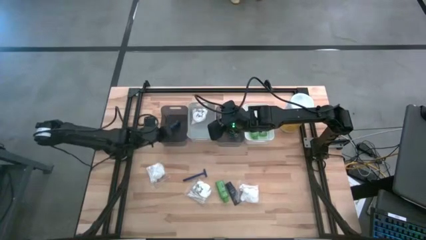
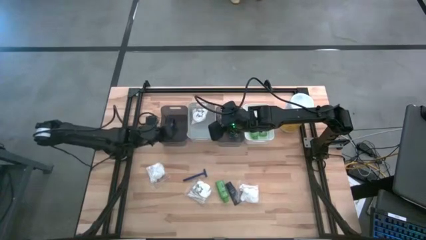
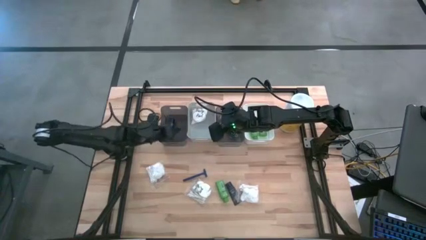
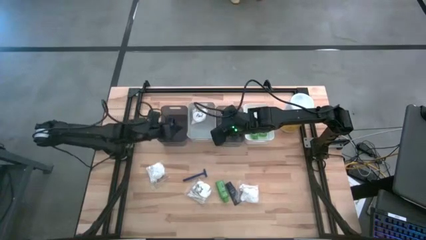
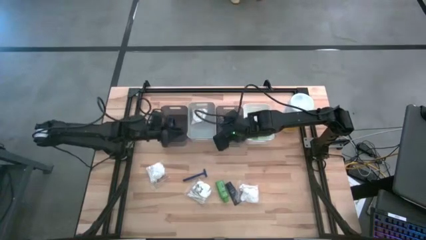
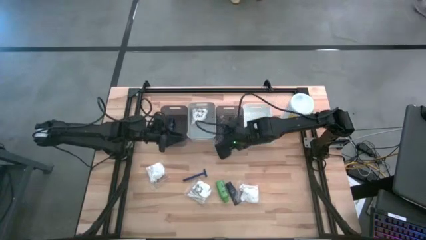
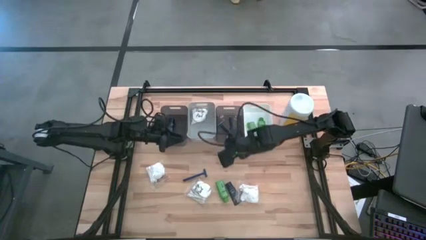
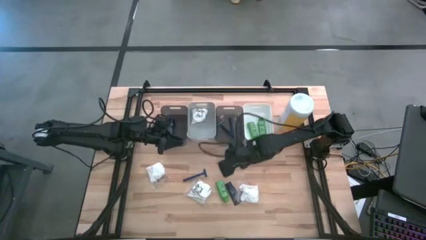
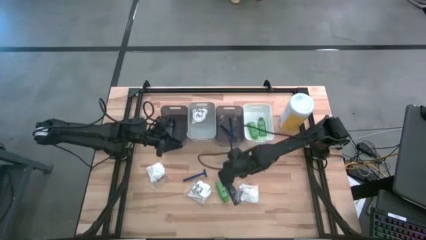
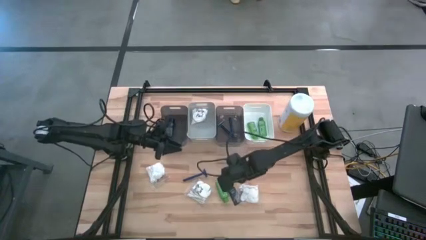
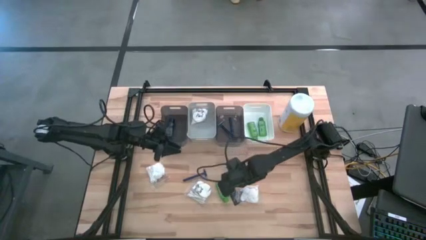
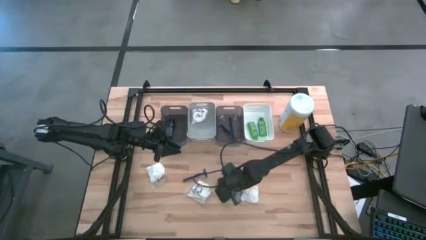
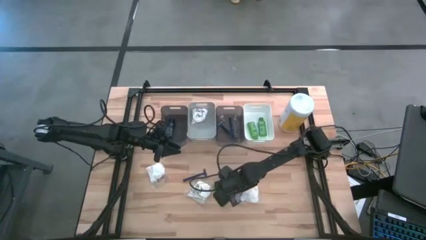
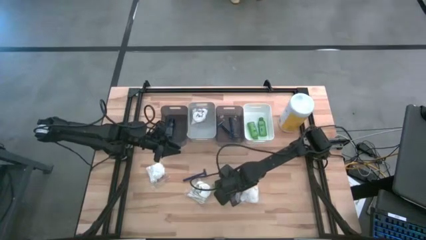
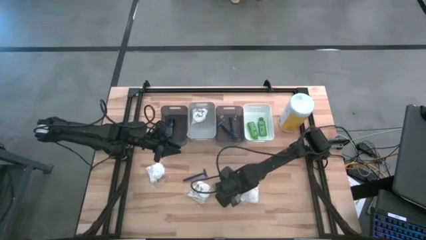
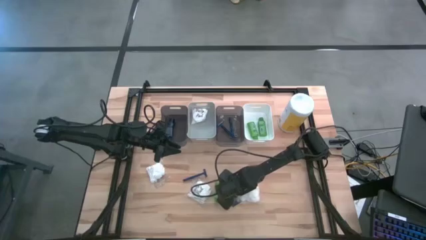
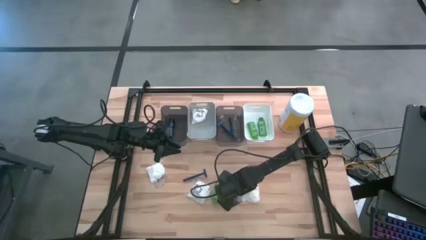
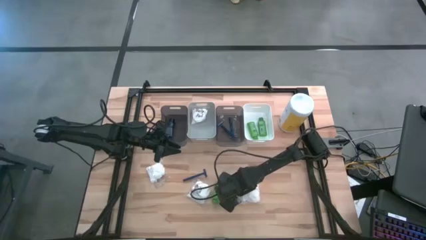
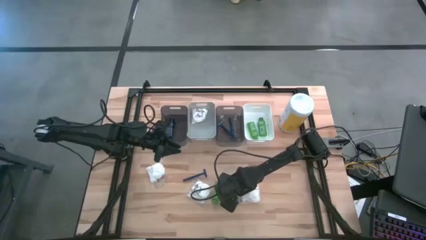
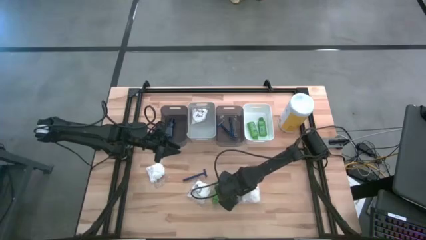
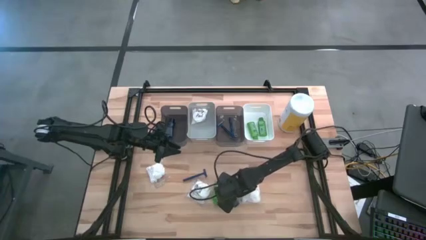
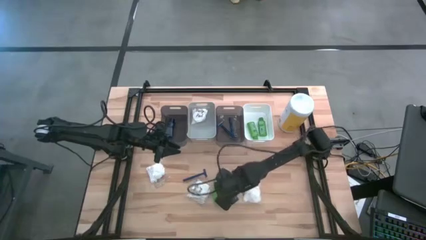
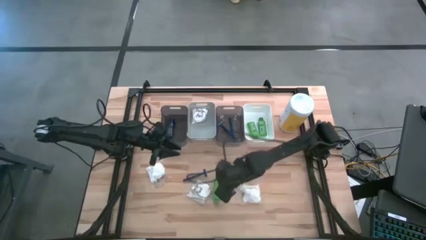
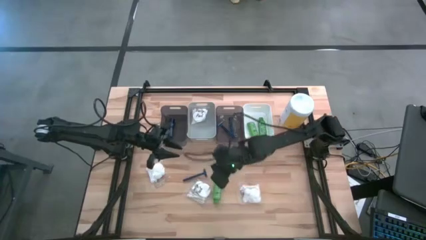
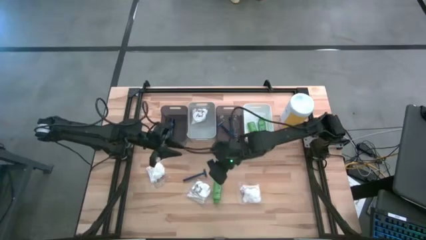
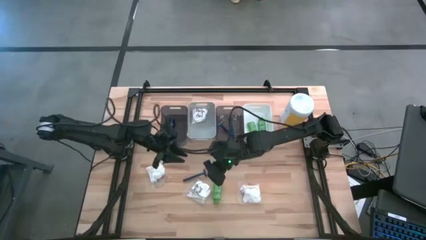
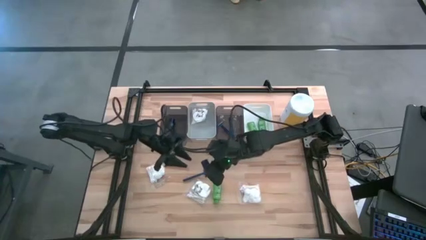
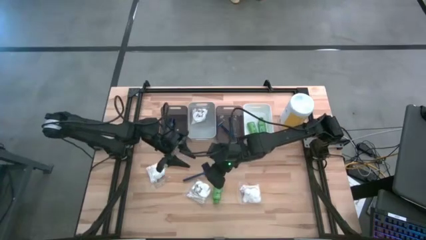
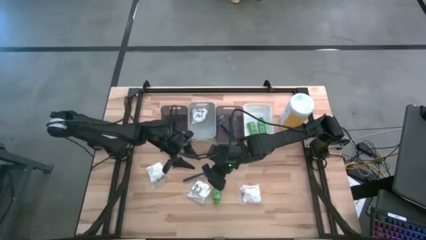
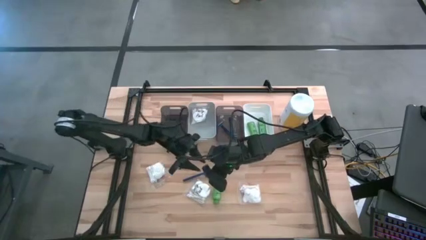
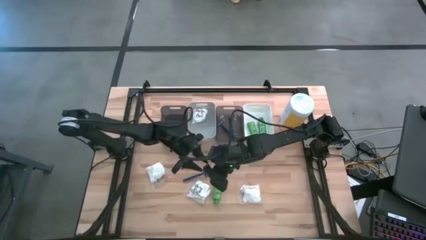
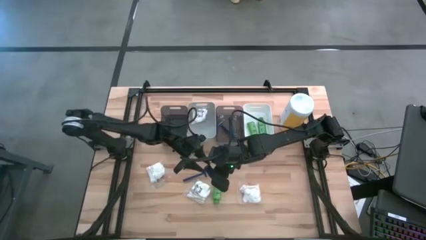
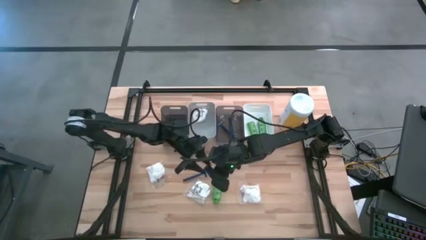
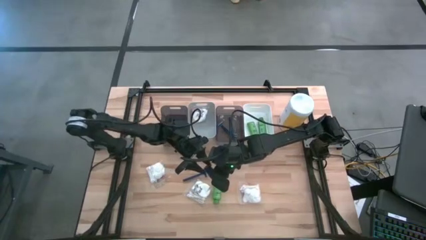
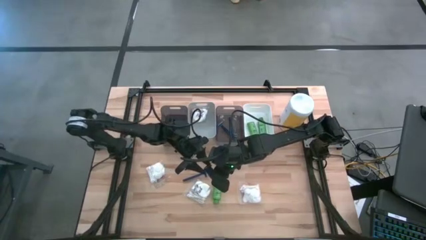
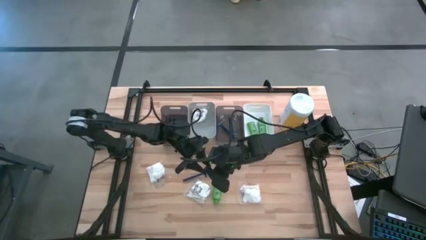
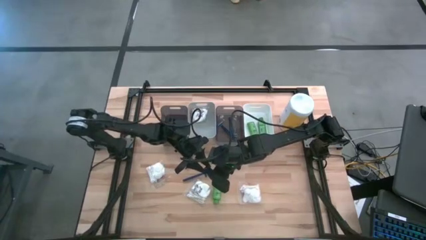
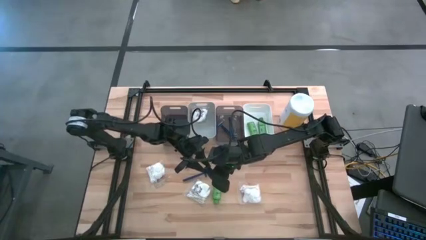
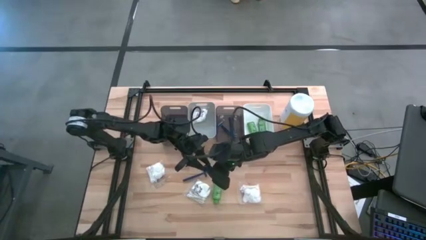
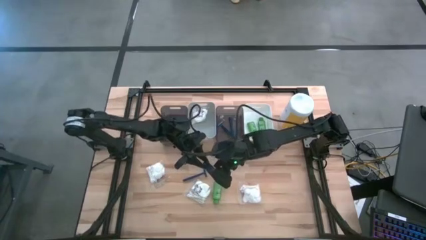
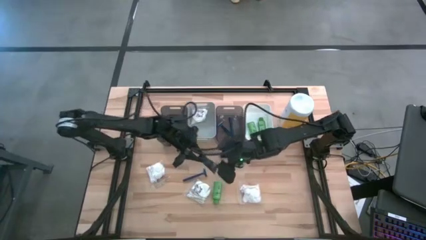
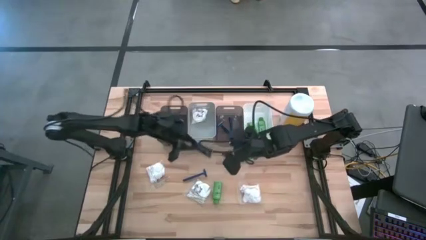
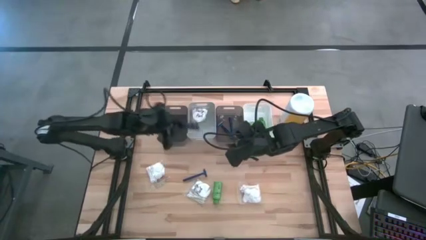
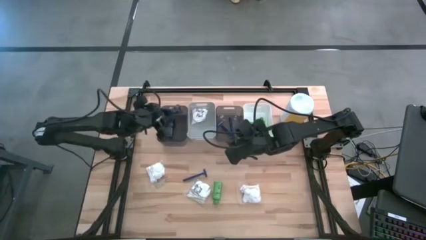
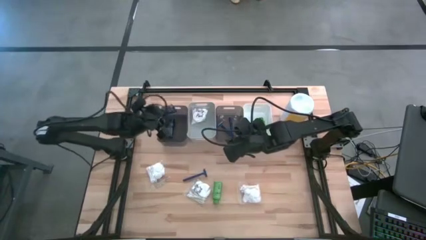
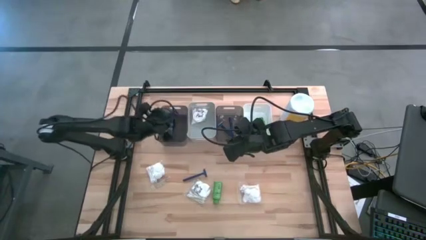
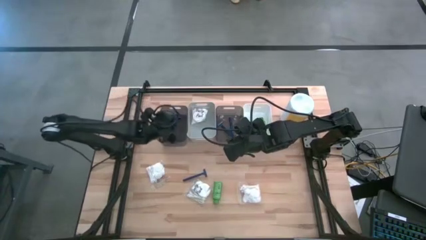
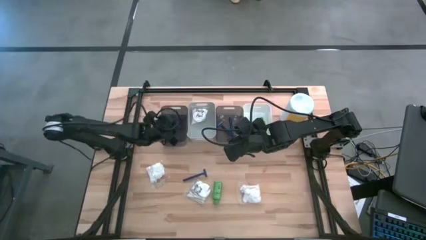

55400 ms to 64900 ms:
Task: Pick & Place Travel size toiletries
Put the blue shave cream into the left black bin

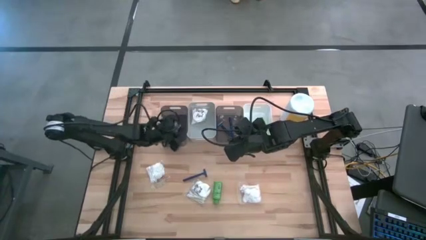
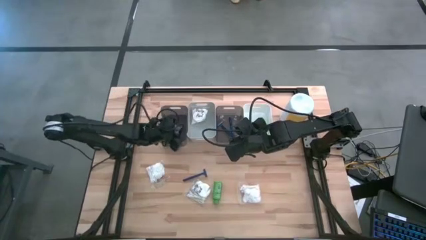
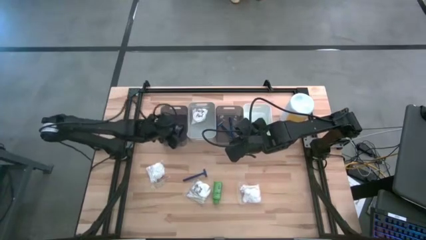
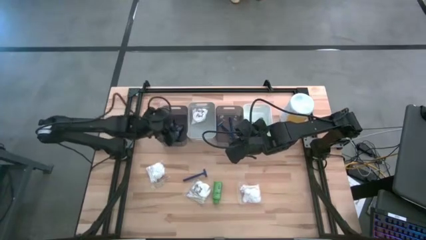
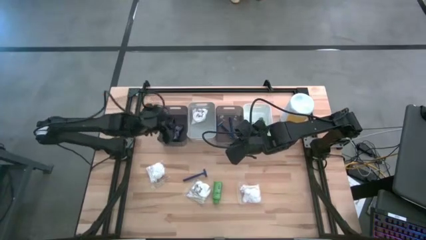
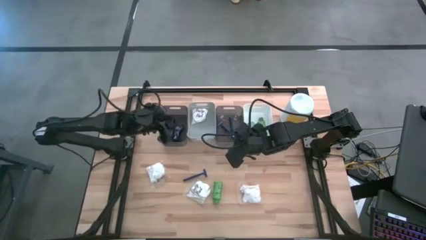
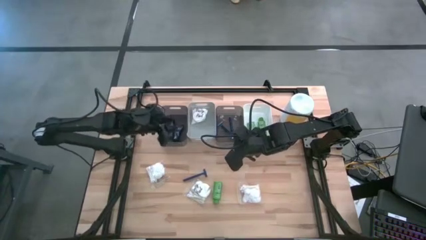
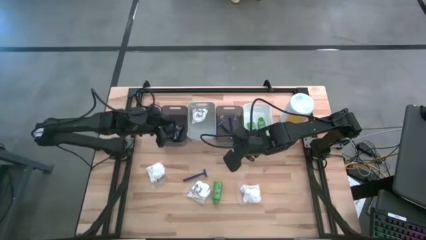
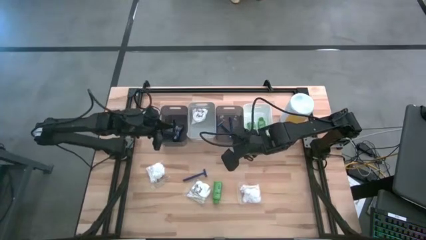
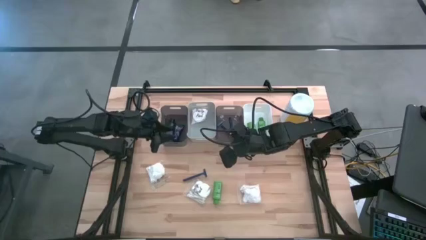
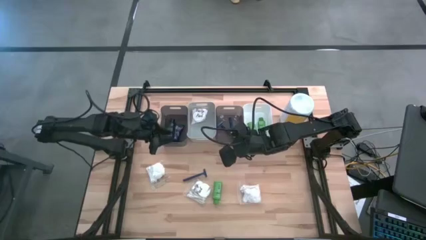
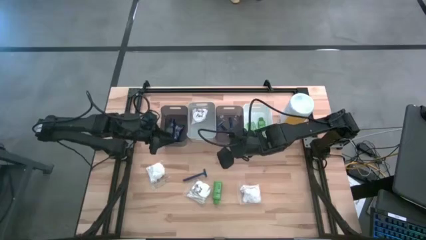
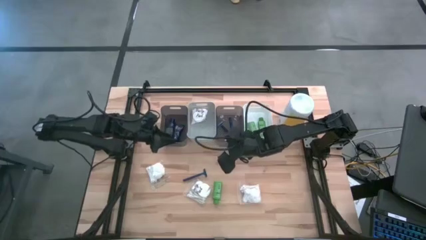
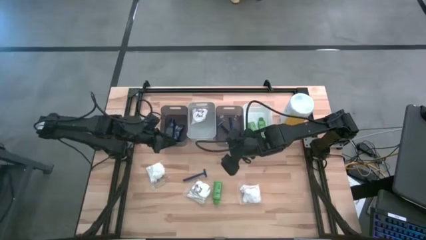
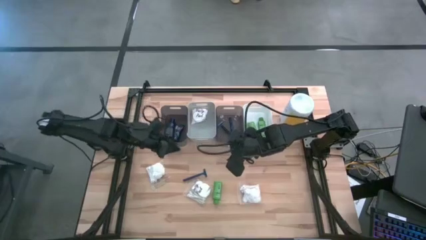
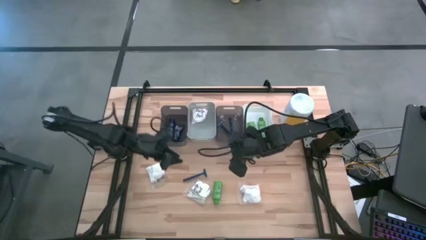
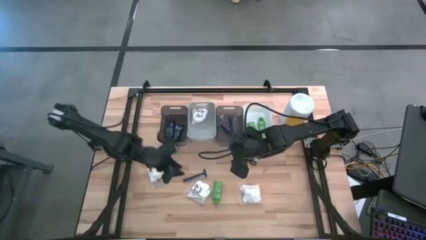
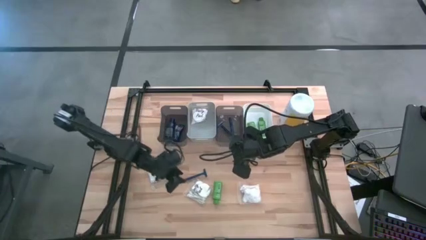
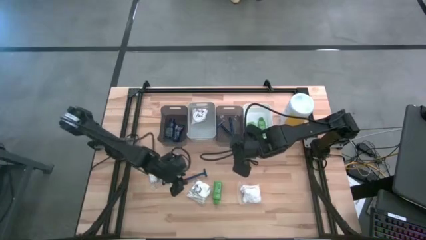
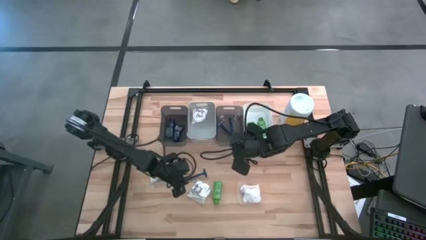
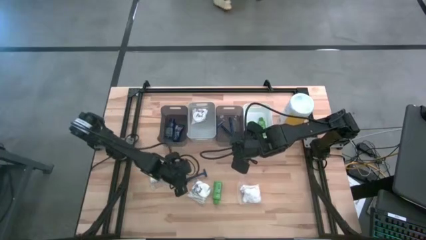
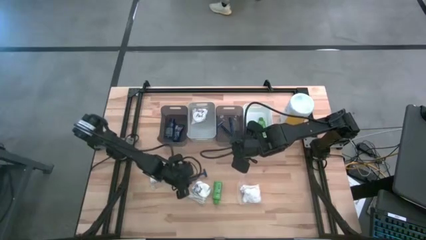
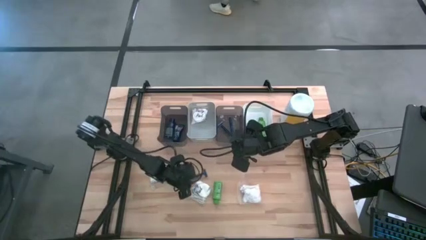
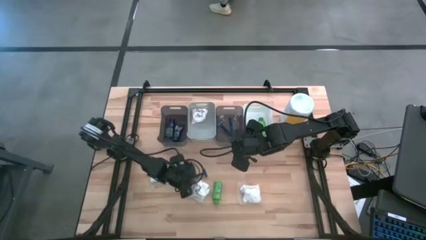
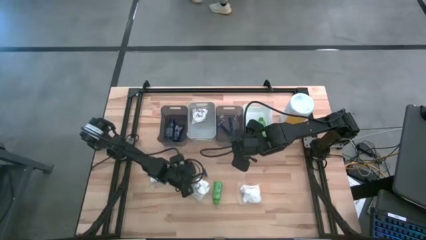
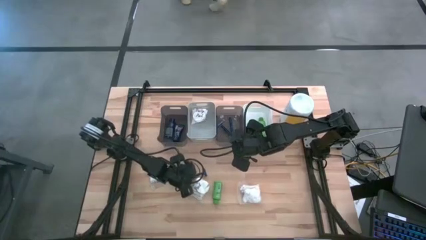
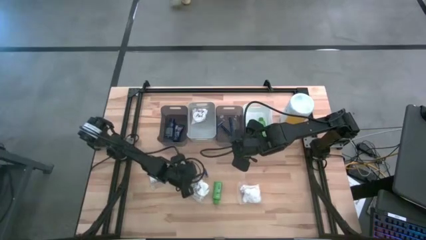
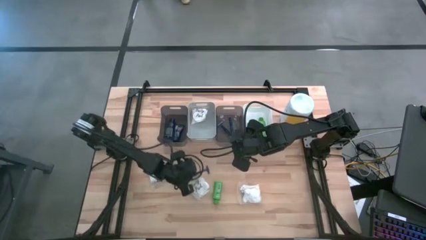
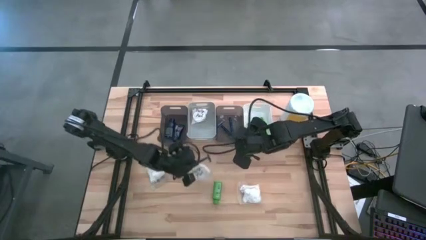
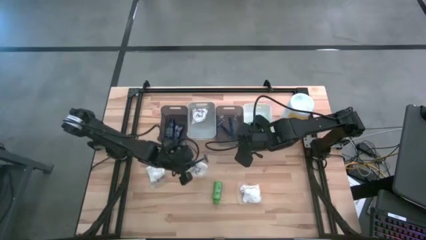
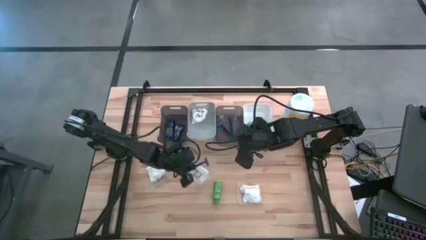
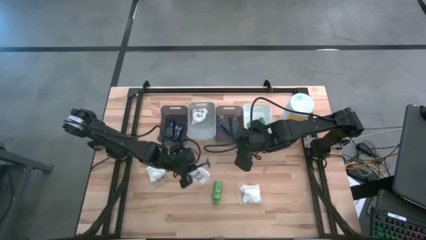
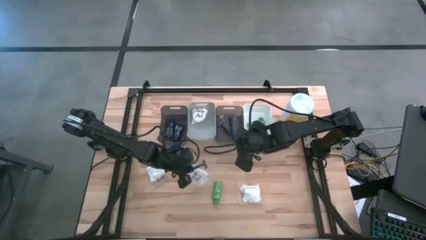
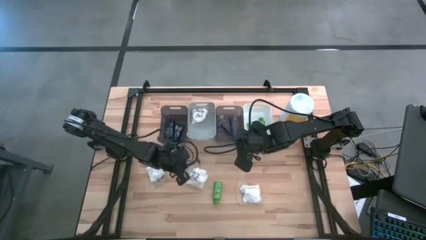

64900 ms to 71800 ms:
Put the blue razor into the right black bin
